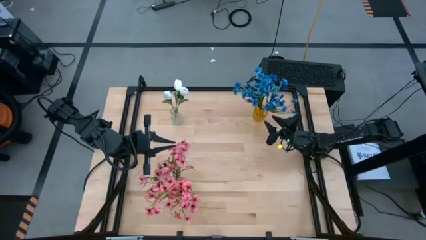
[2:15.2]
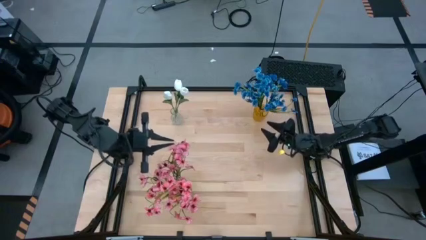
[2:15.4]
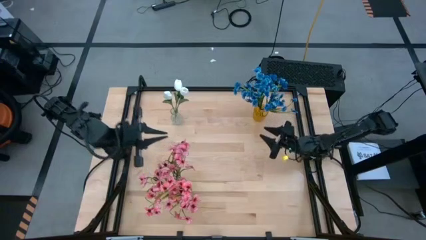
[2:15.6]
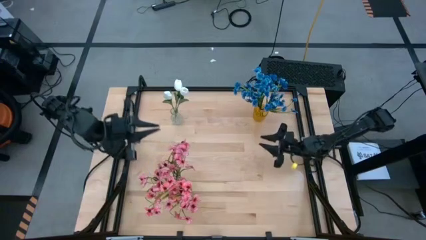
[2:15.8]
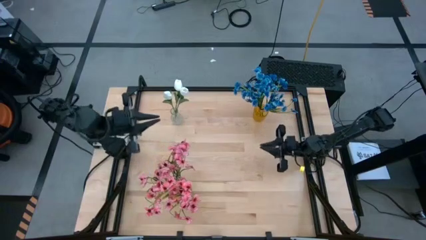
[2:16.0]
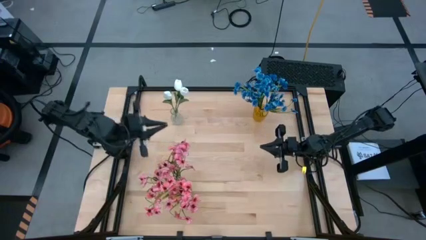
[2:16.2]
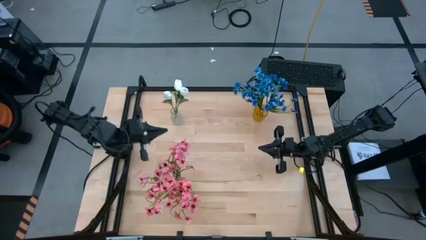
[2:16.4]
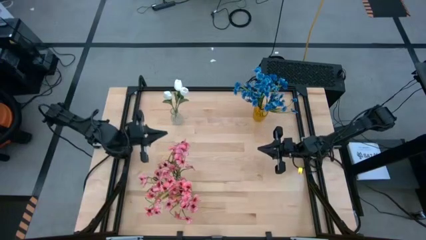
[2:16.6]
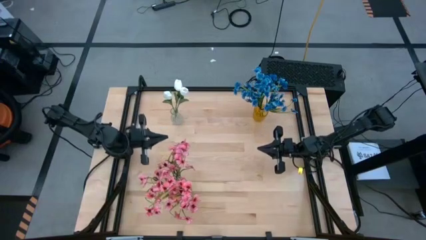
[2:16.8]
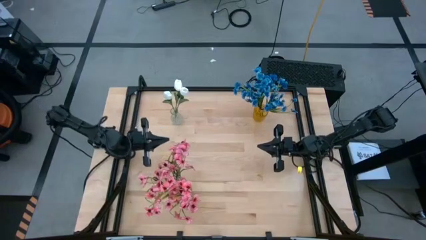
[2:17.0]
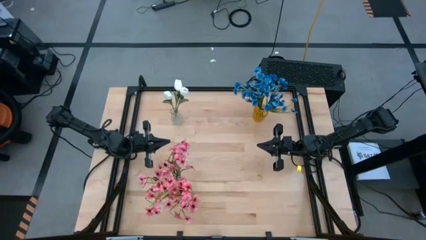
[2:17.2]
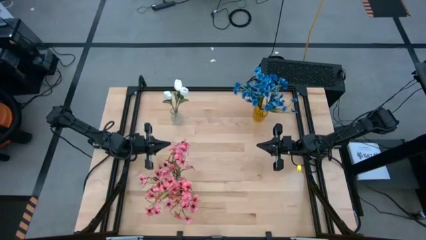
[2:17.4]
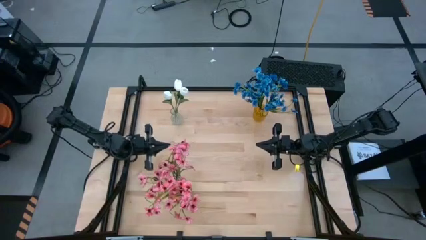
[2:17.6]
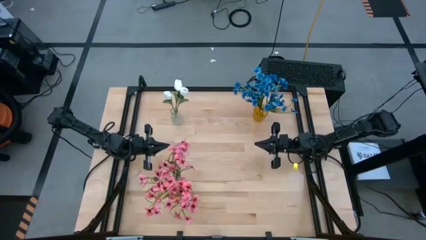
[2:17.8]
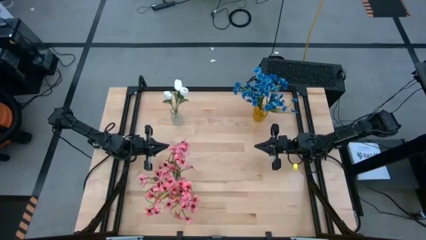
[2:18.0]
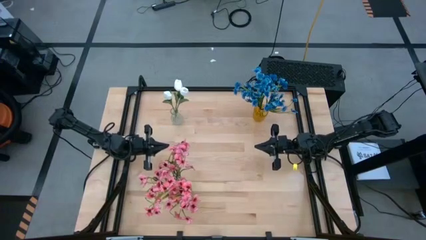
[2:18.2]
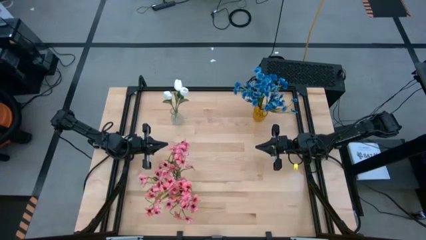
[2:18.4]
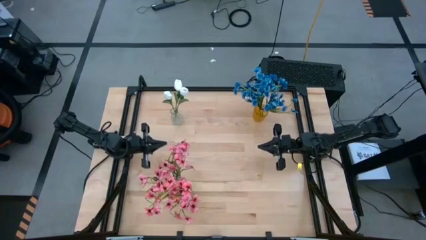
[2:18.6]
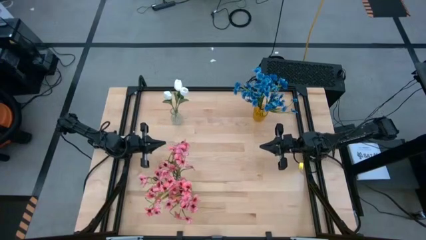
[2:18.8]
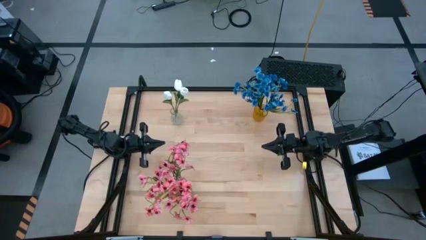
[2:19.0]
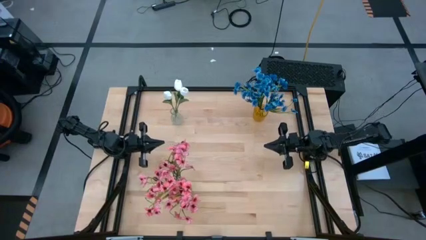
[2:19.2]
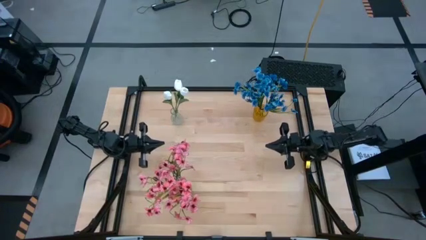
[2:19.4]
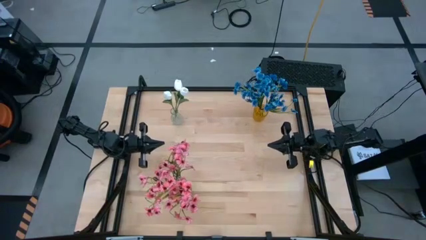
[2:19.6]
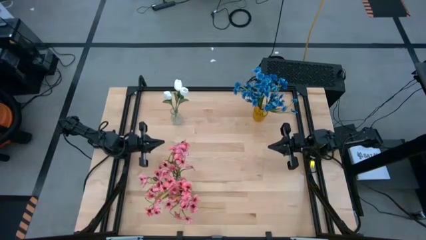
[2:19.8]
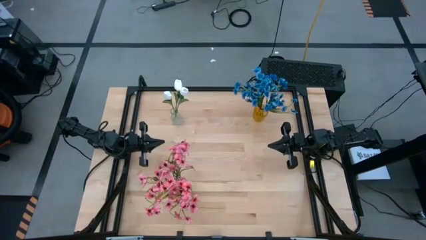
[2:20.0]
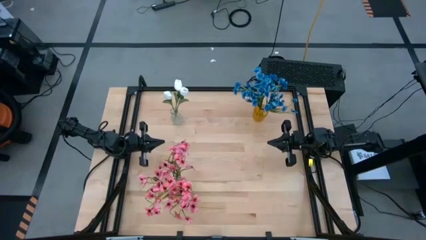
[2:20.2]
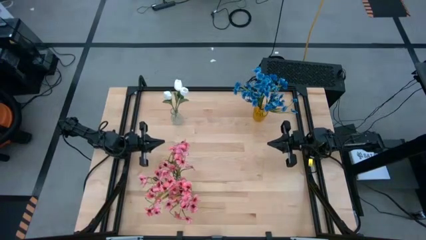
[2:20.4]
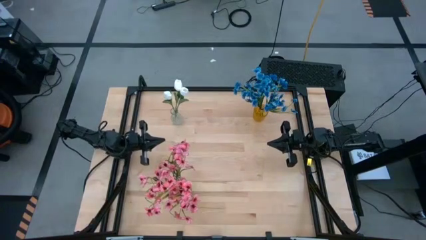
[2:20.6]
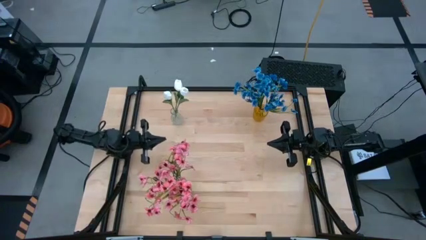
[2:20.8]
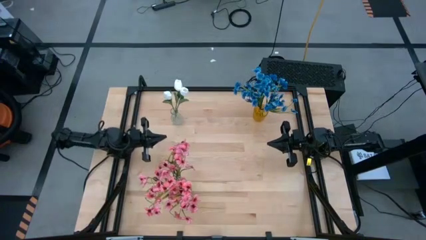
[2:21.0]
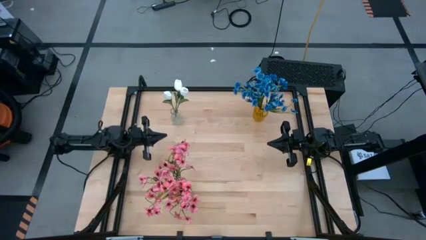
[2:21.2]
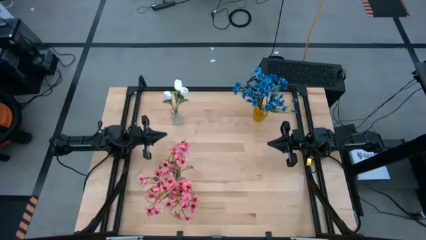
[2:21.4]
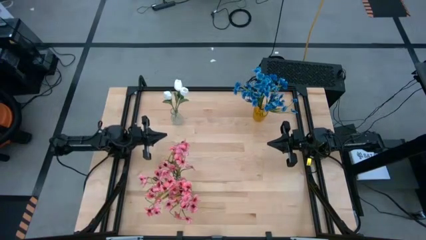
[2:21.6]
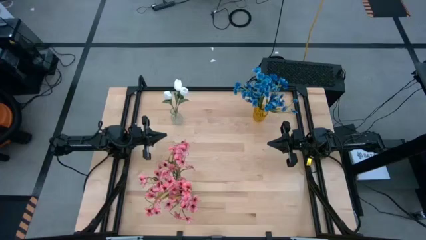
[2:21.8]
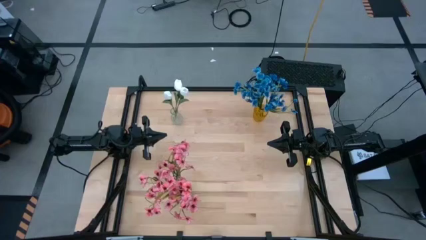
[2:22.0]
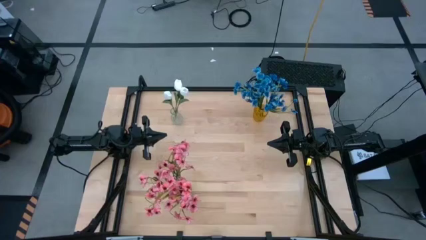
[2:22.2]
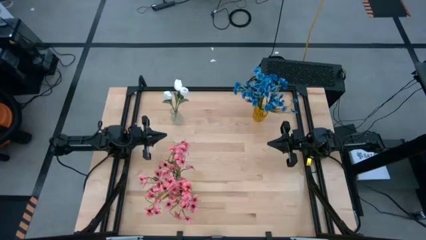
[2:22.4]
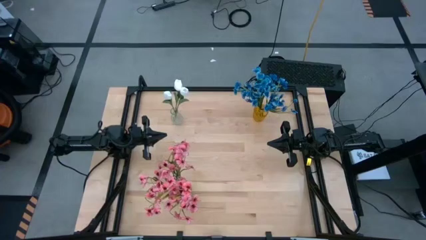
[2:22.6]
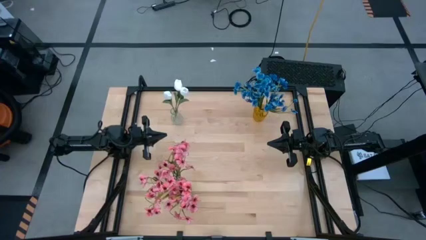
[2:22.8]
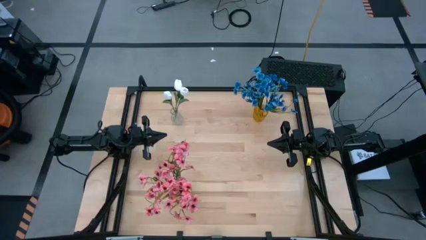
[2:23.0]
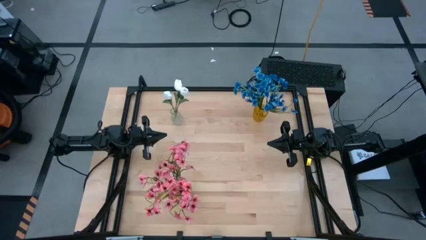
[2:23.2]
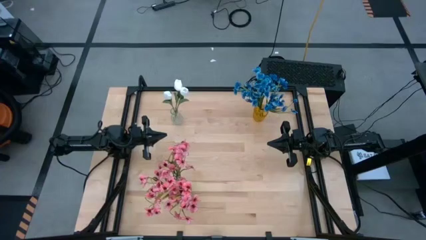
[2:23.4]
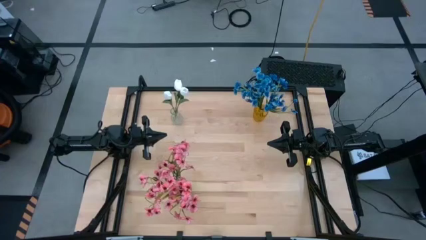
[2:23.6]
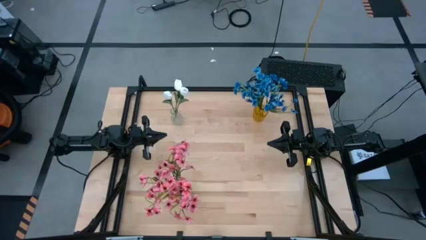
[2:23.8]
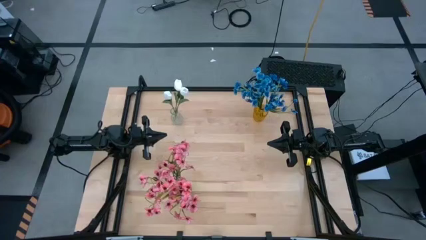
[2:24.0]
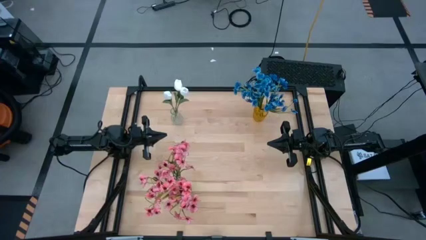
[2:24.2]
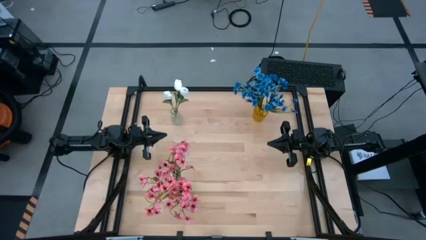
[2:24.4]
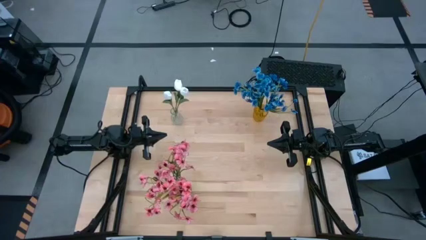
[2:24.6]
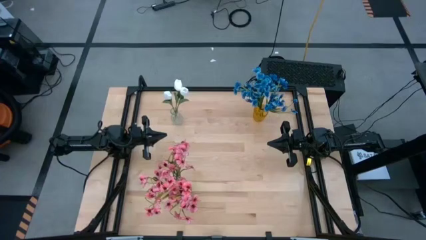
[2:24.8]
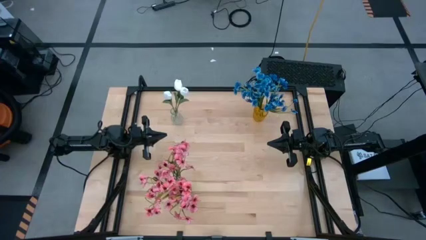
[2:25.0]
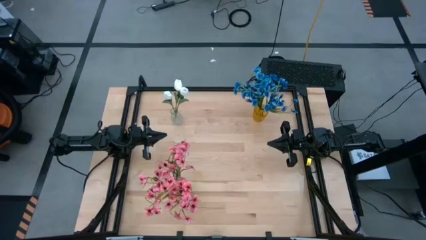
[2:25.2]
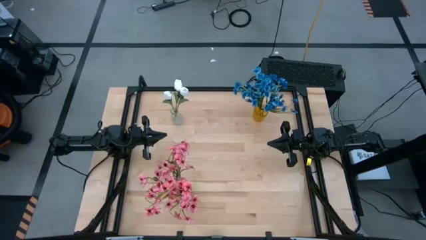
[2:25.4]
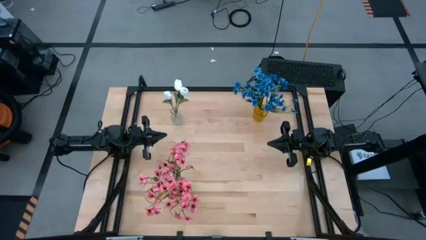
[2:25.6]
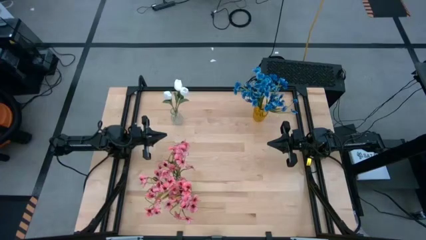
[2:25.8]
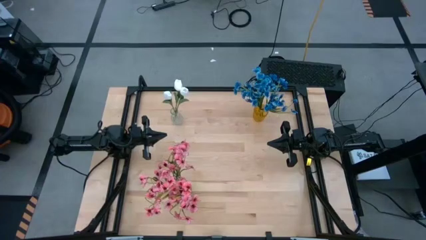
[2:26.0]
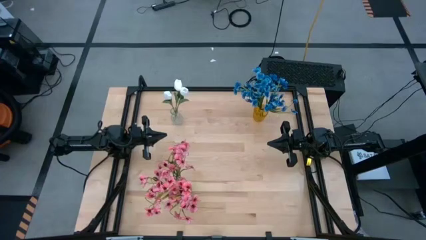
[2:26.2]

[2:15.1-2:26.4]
Task: Sort flowers into vase by color
Return to Home Position
